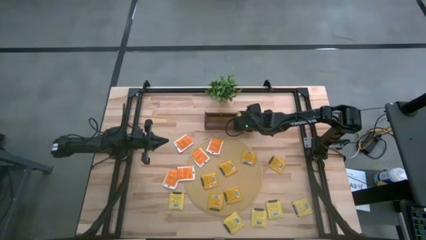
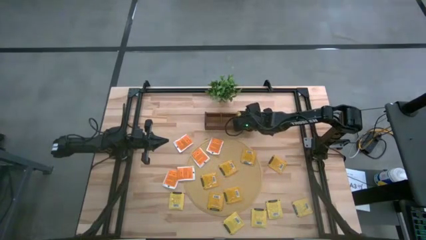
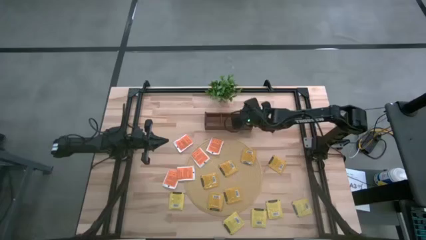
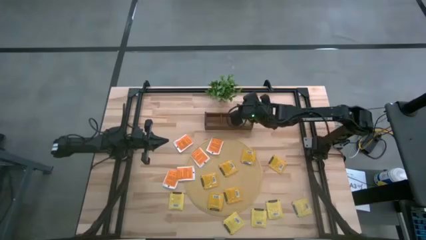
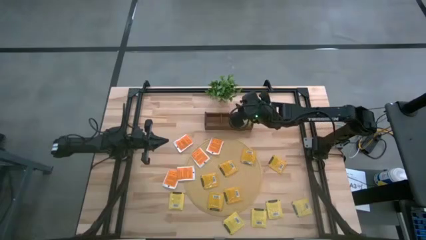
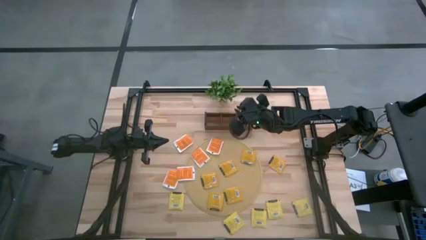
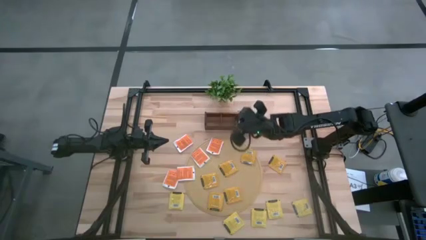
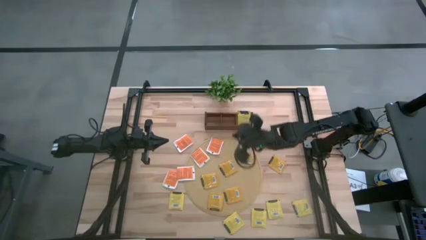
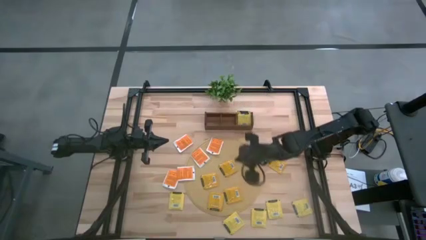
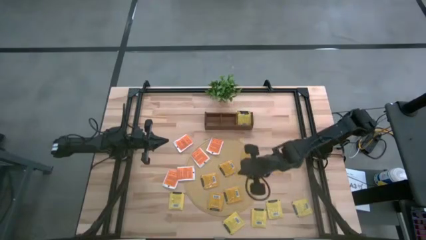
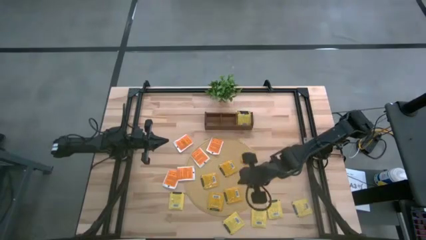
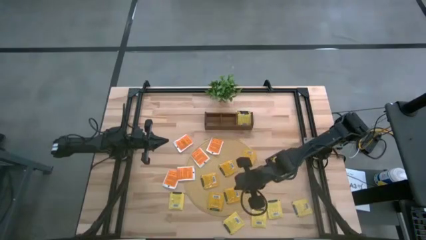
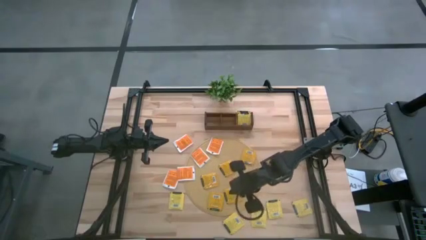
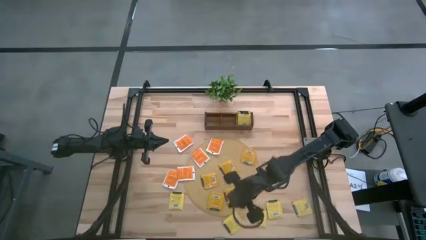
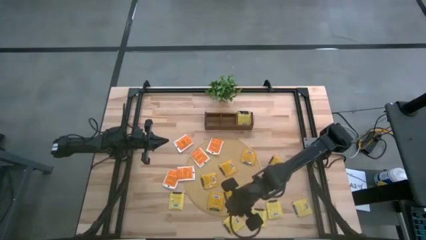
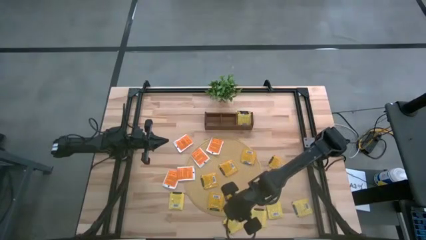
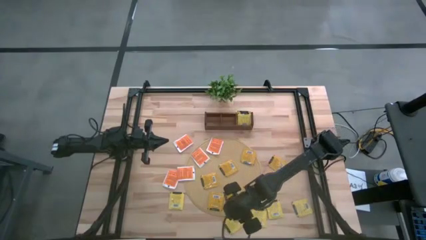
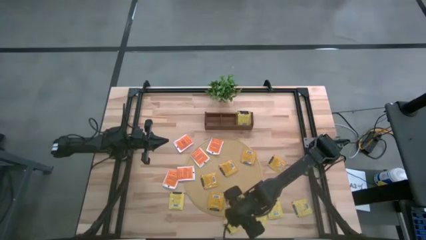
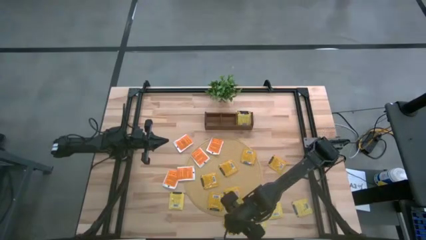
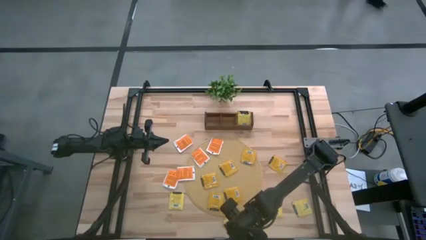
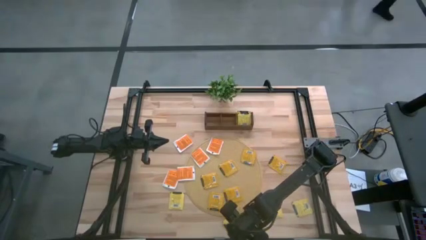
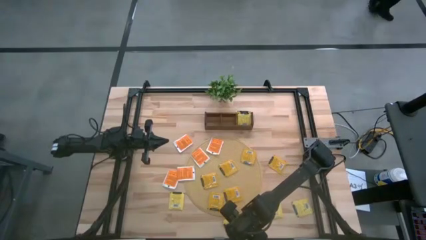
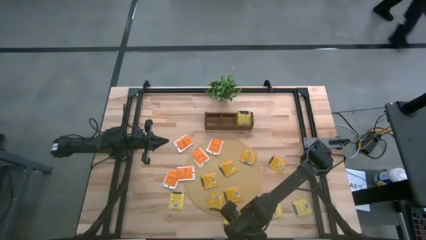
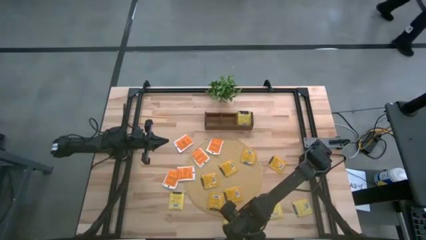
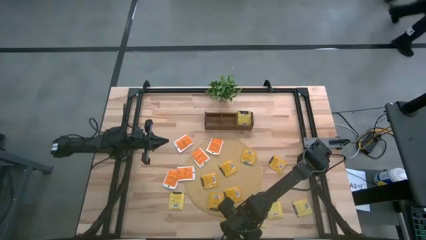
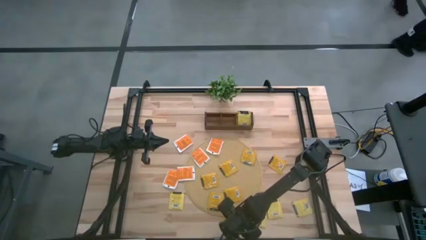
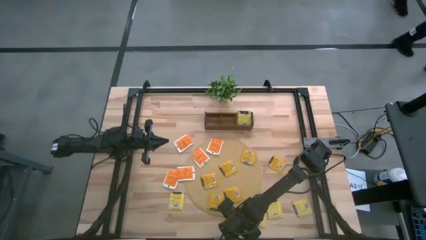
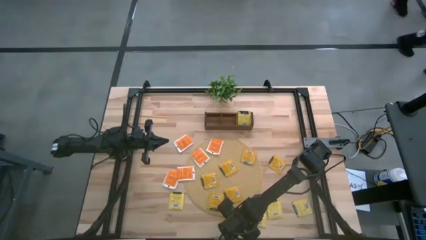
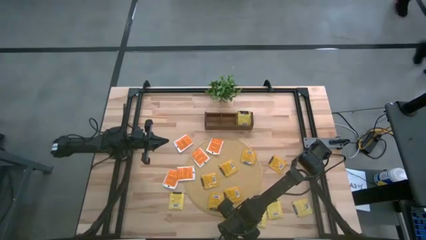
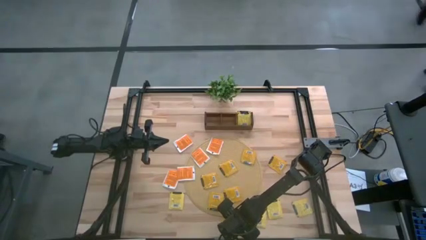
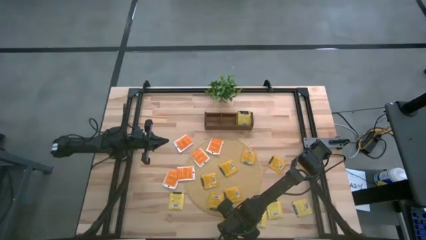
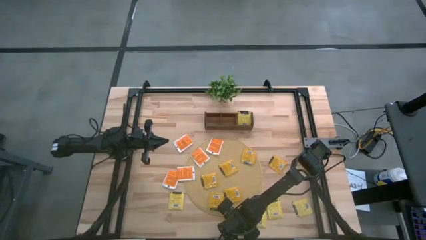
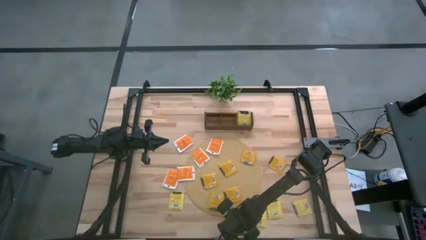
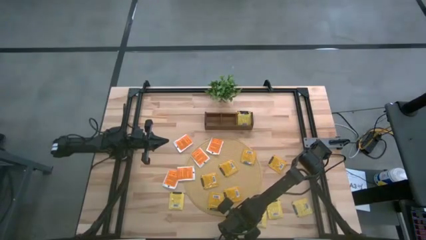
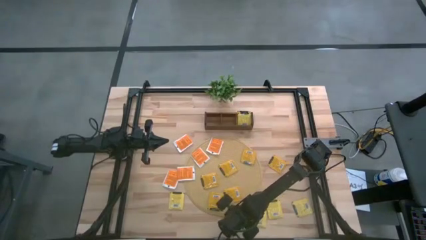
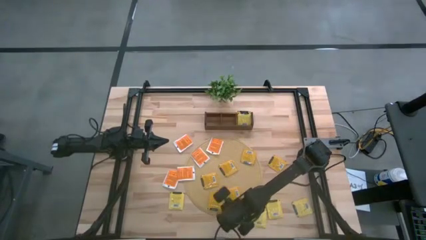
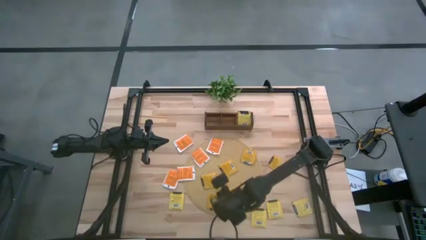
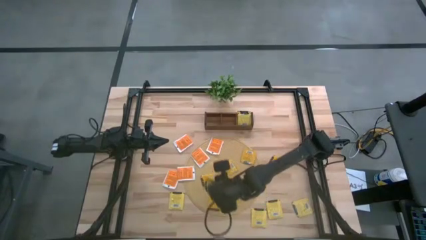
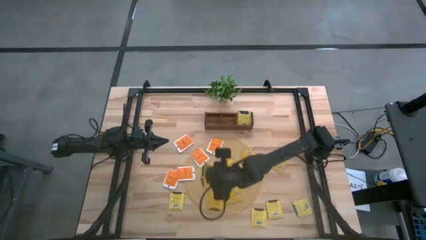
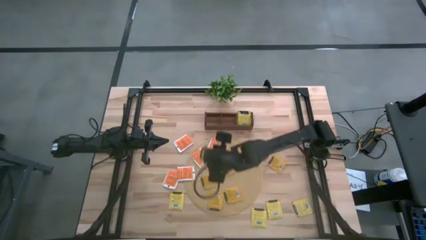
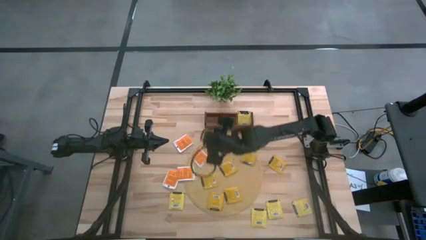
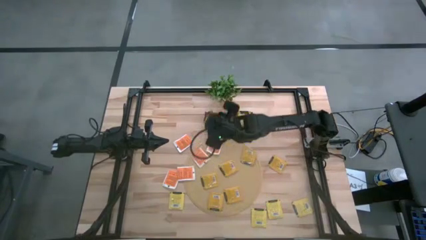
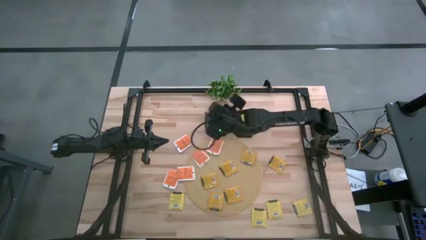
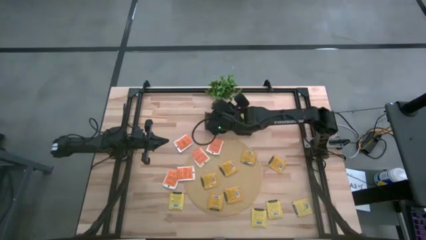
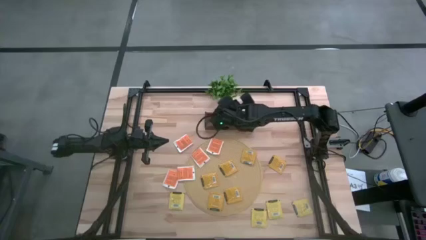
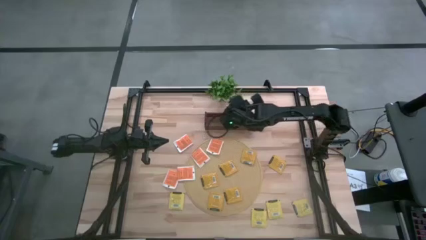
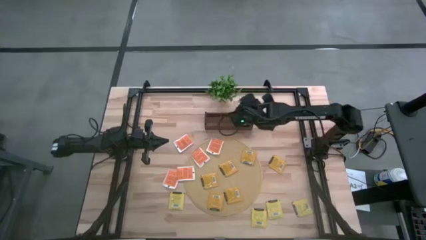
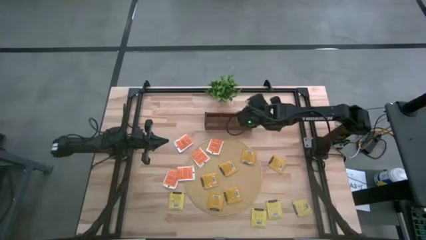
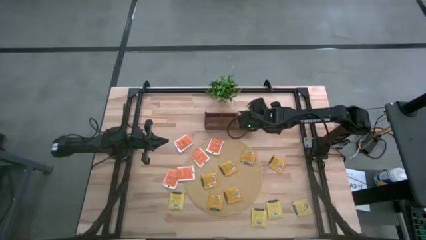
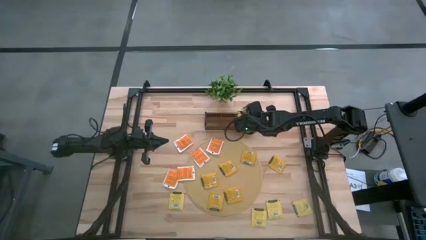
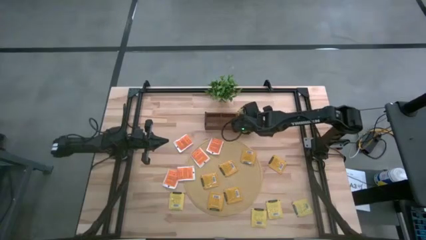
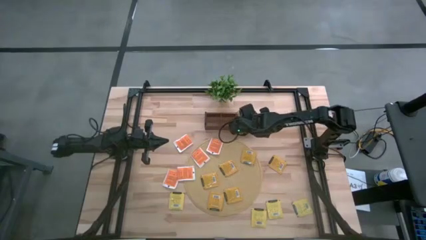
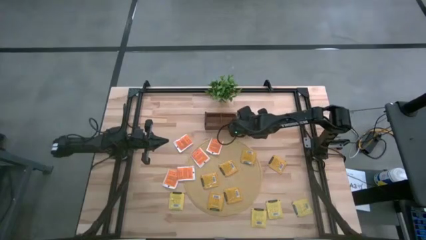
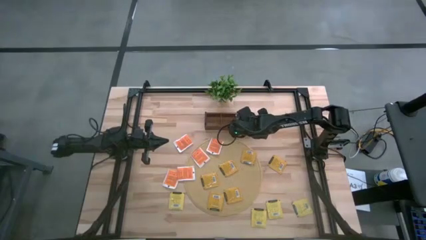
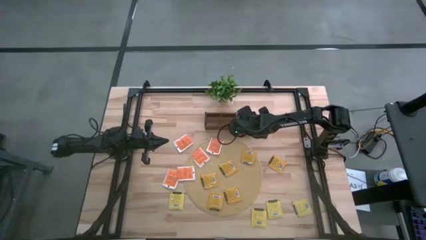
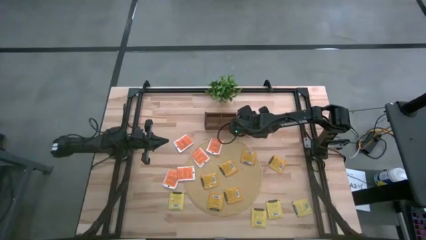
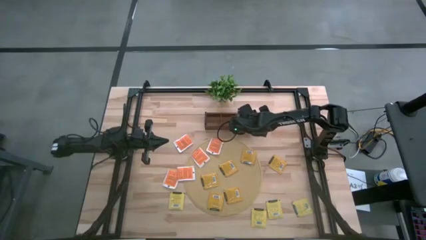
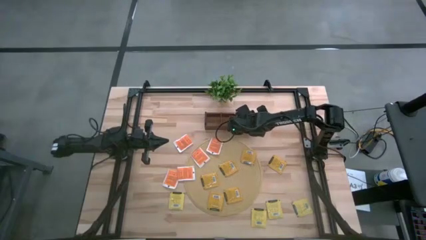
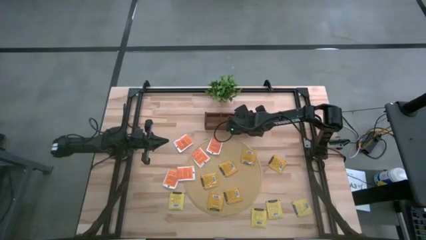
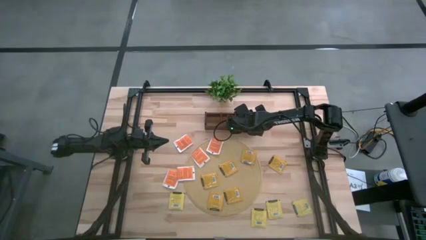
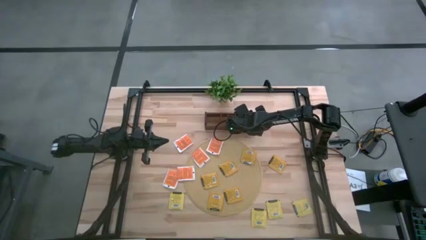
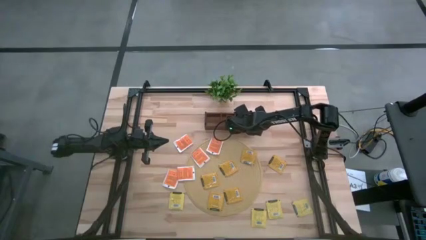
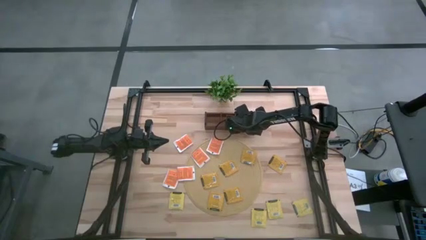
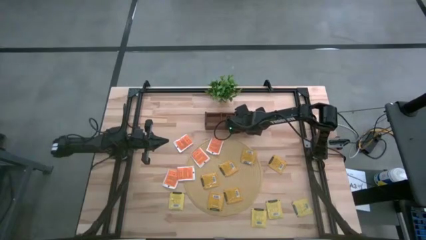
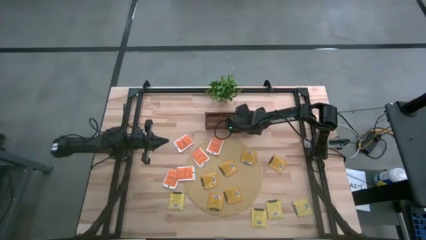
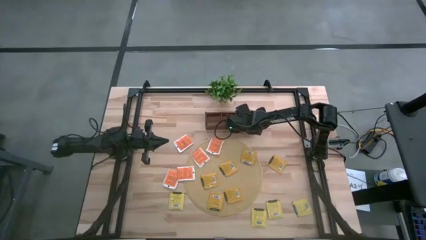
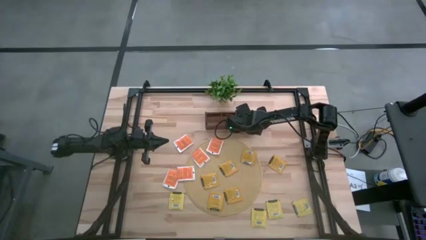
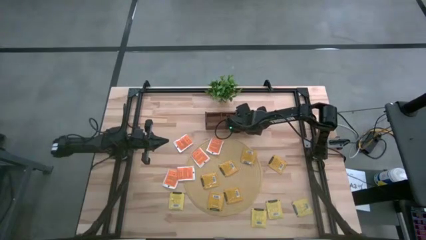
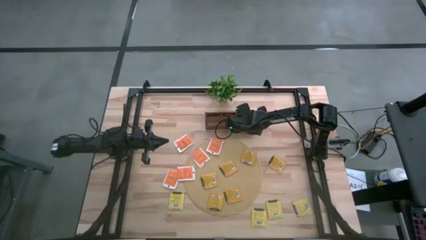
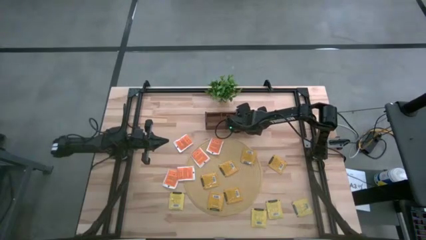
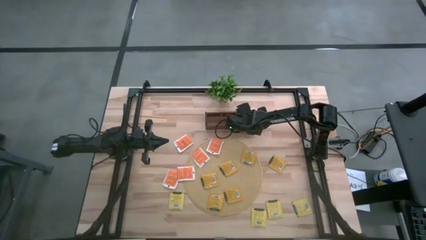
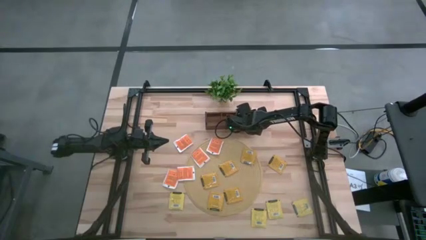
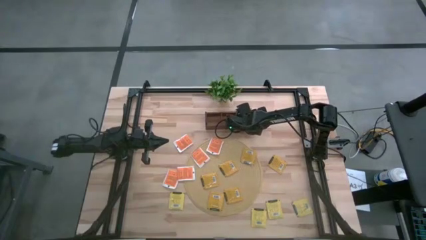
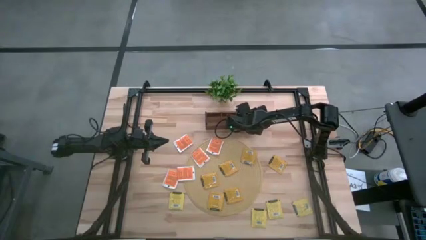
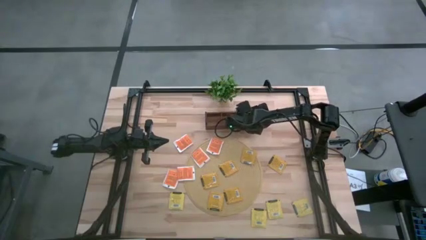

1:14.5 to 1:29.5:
Task: Pick & Place Tea
Put the yellow tea bag into the right section of the wooden organizer

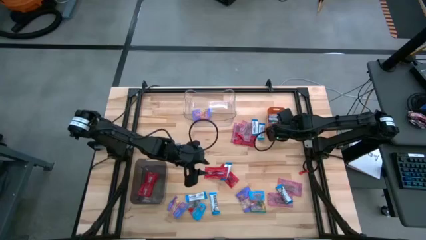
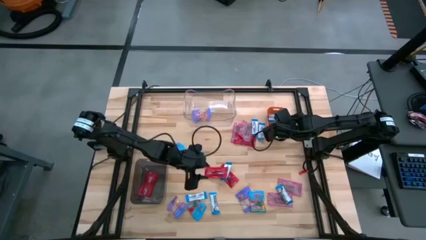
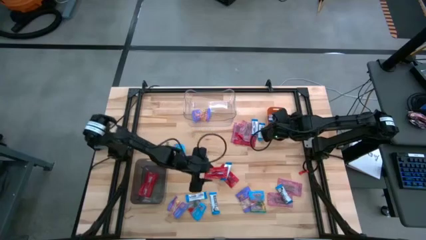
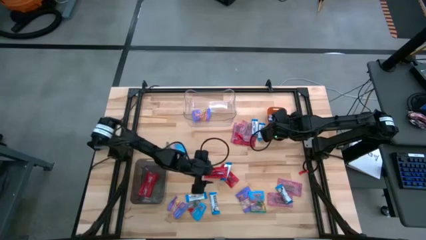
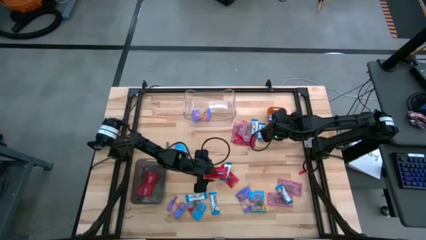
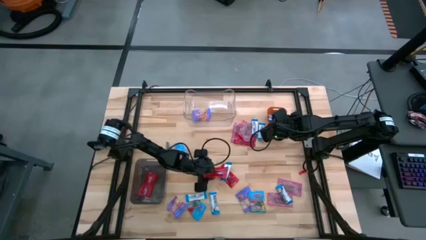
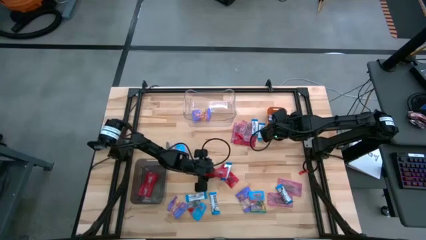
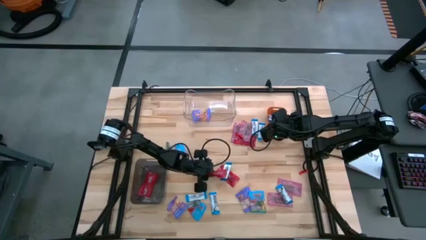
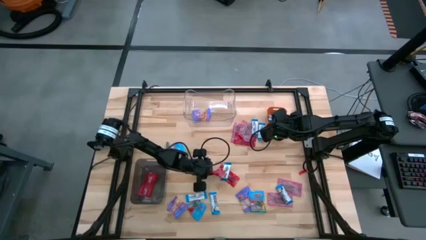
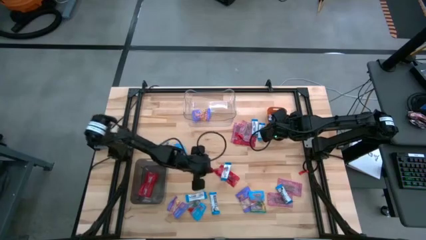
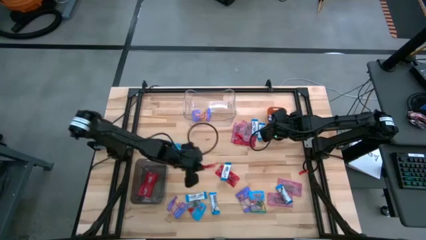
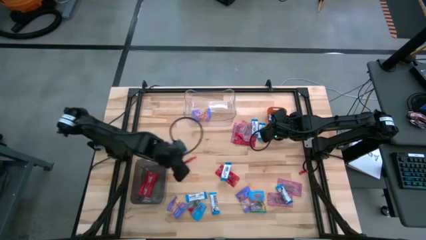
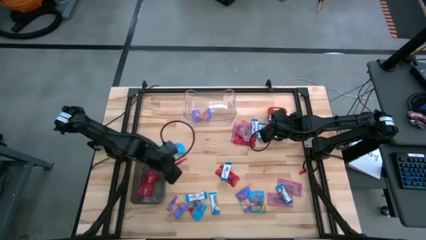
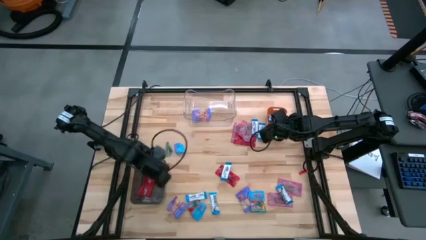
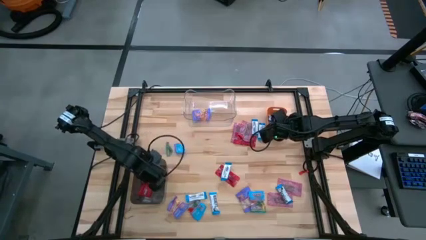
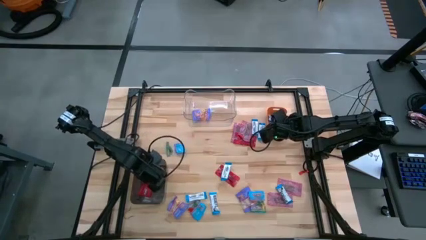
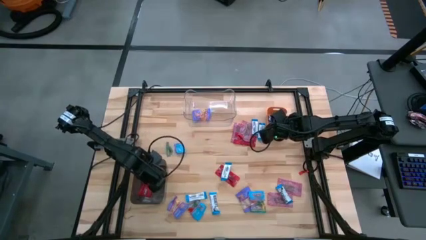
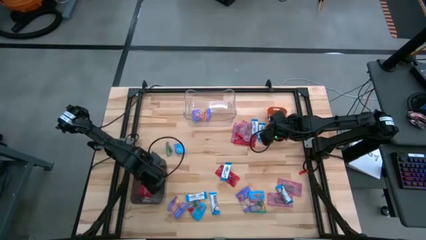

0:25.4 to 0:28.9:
Task: Sort candy
Put the red candy into the black bin
